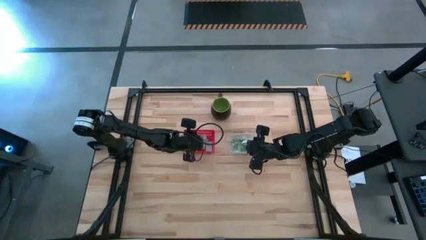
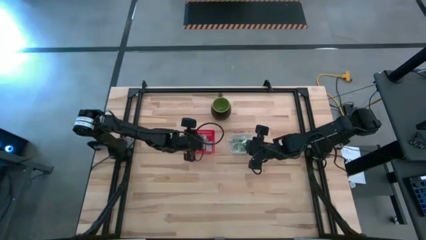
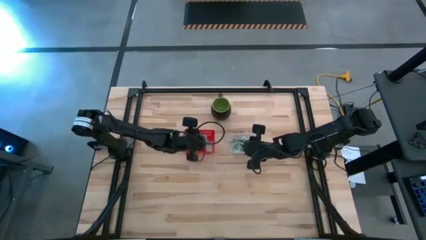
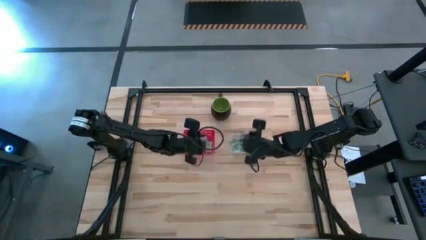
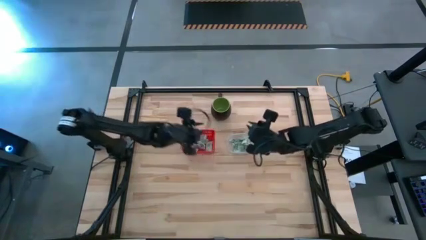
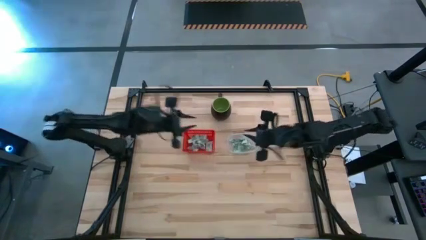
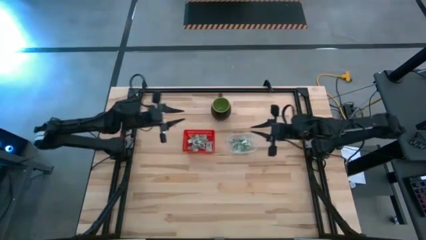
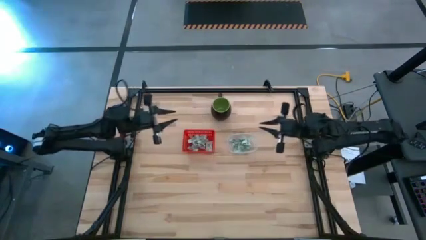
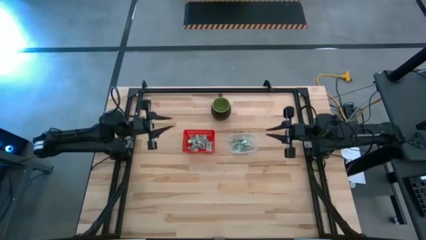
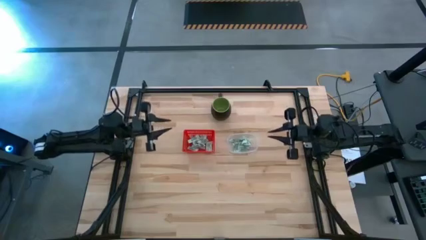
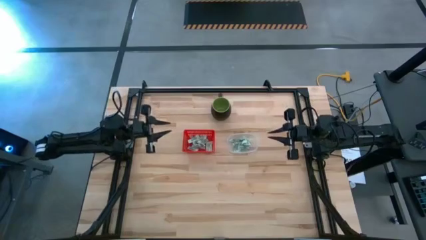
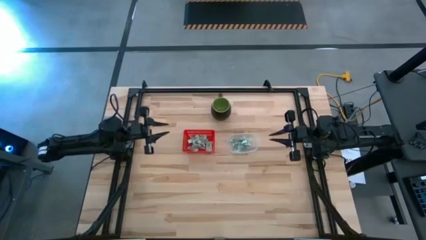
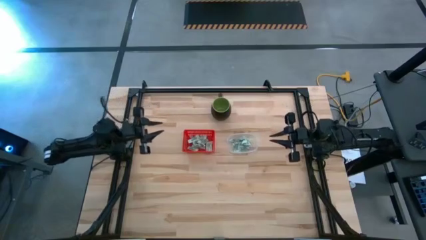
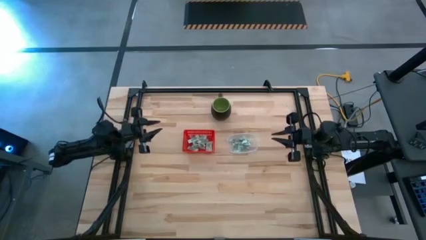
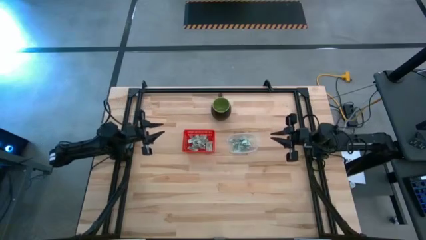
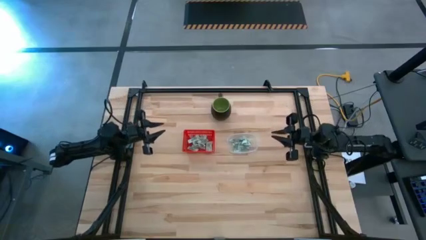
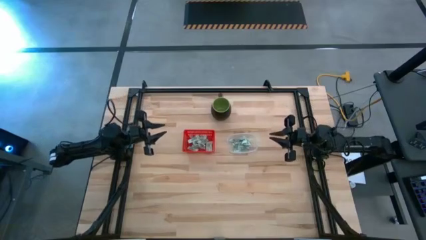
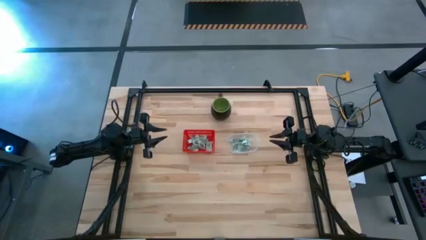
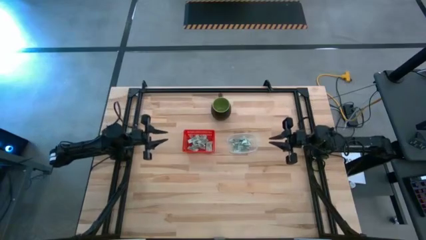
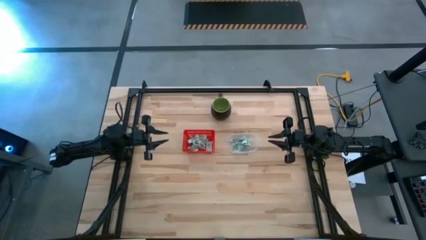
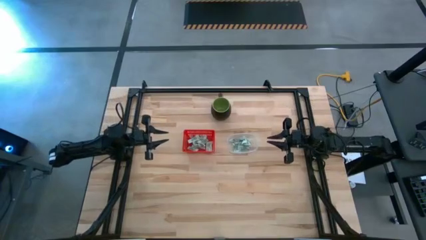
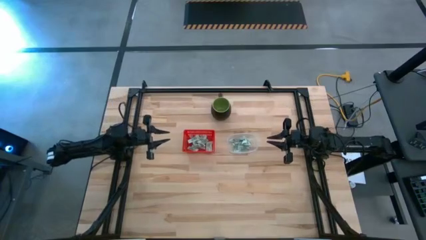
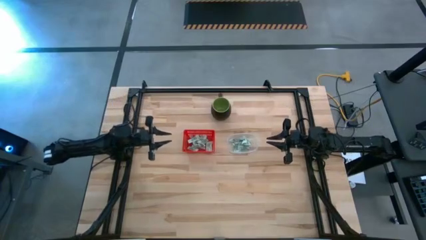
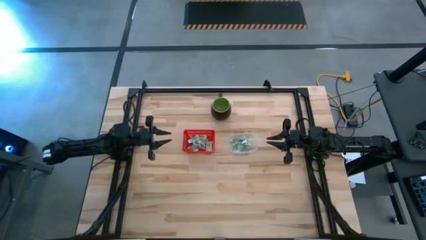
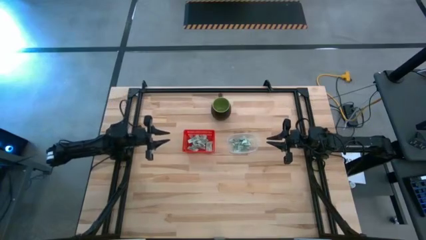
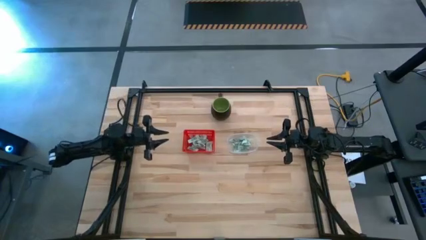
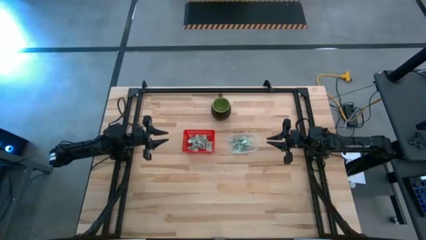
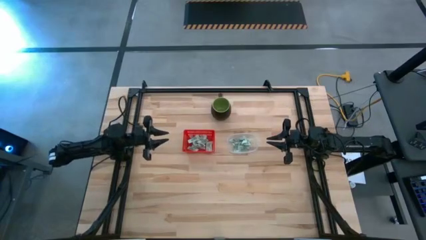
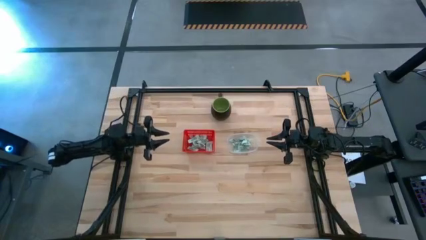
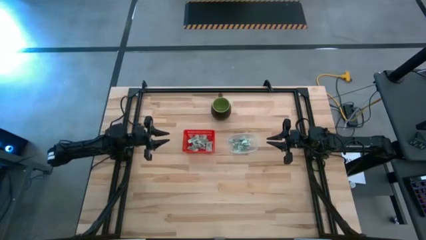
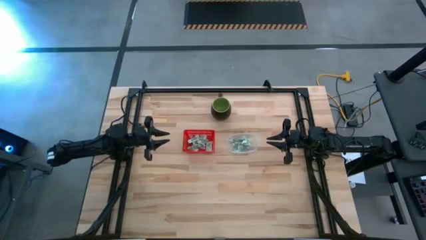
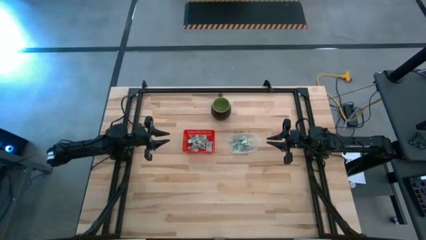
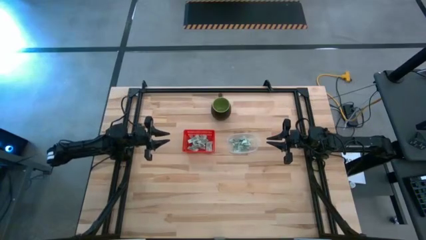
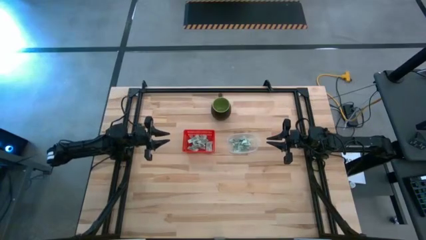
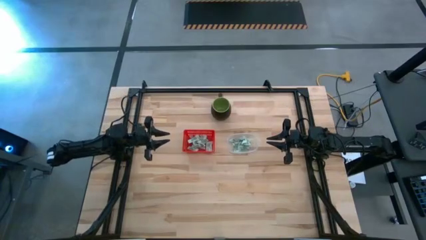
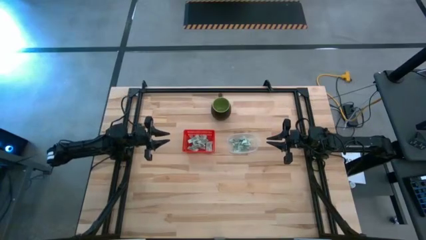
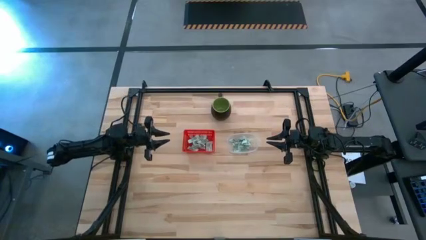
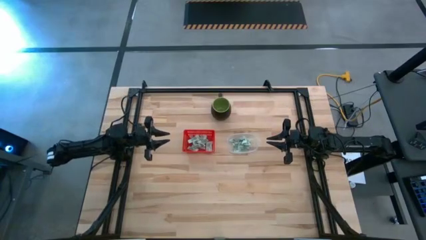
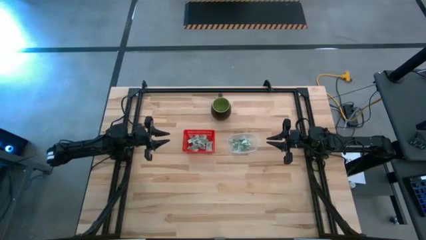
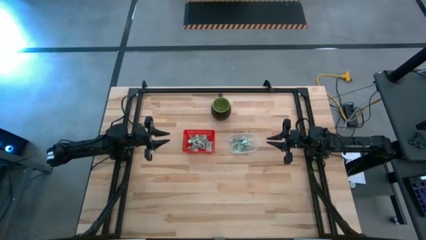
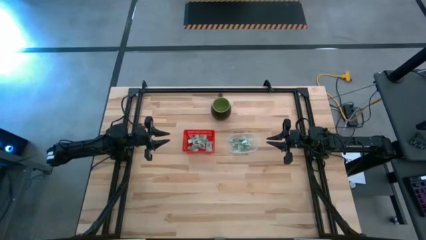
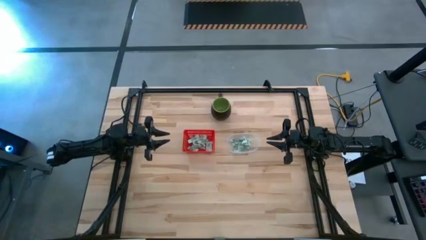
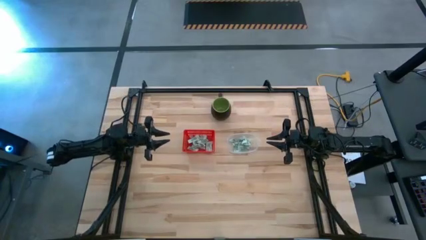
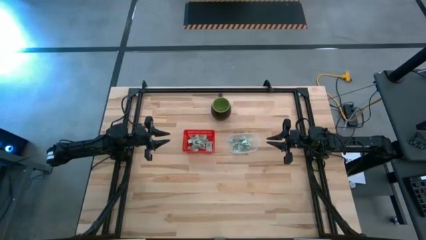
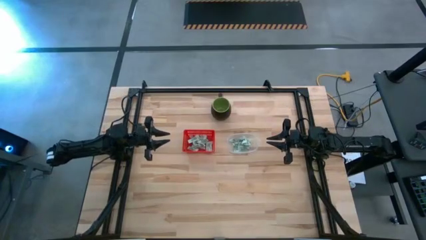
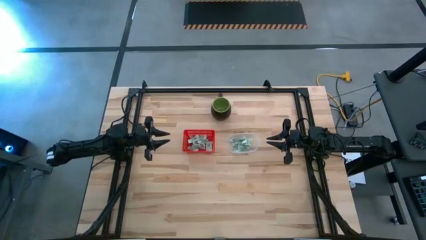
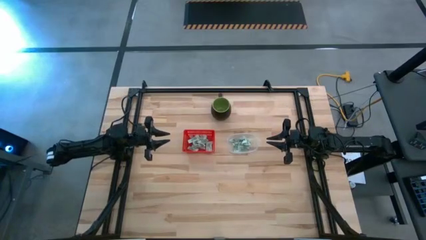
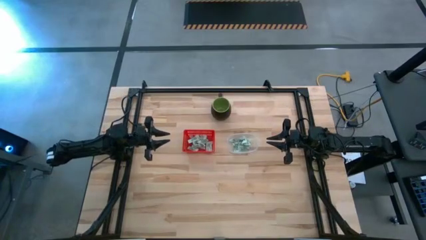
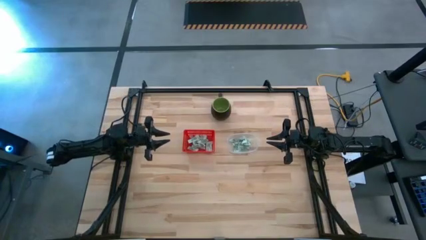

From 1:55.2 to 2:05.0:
Task: Pick and place items into bin
Return to Home Position

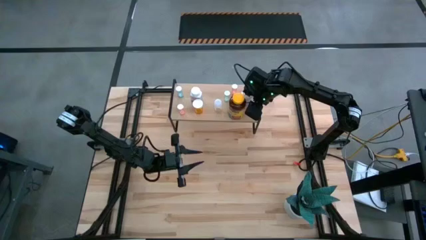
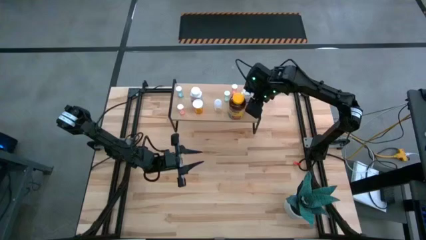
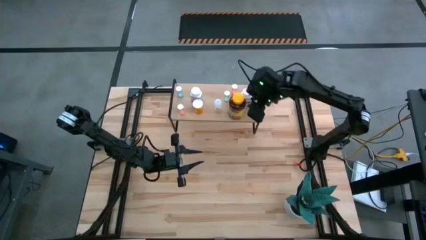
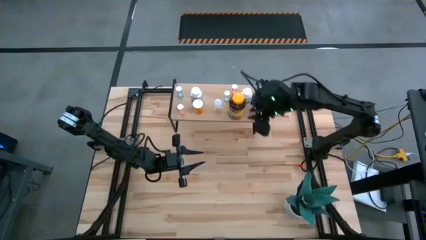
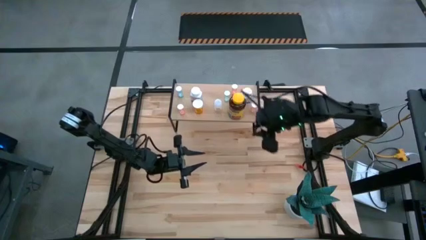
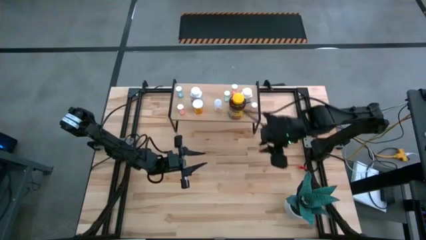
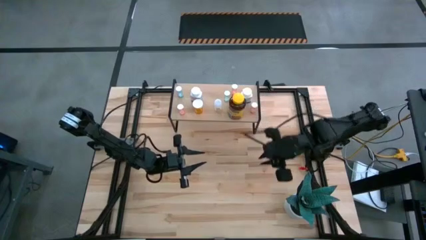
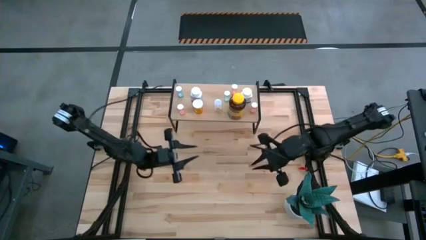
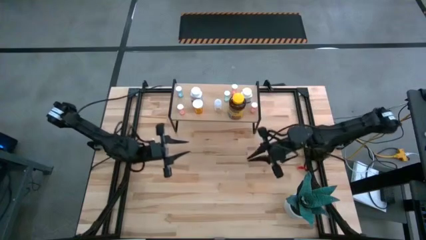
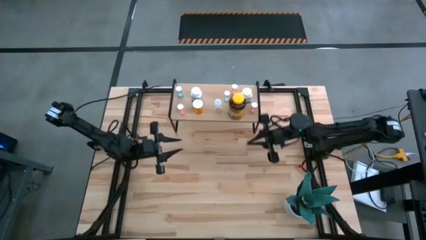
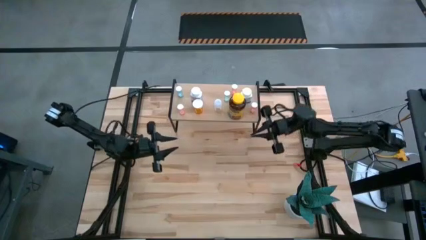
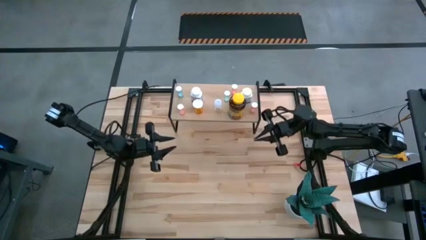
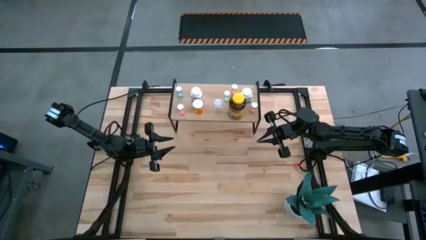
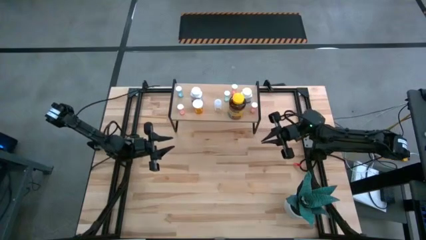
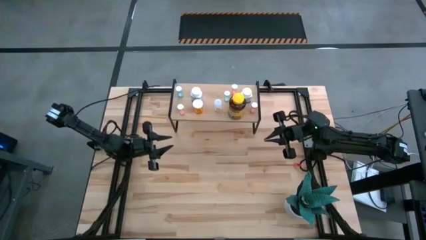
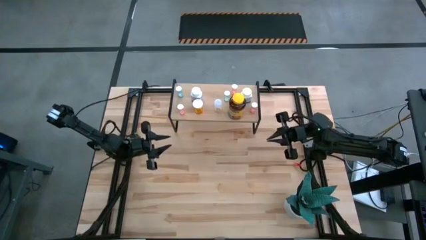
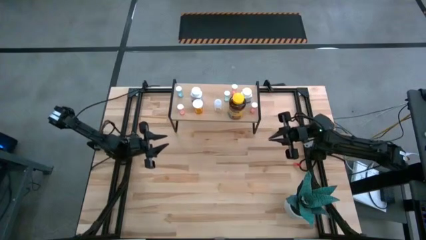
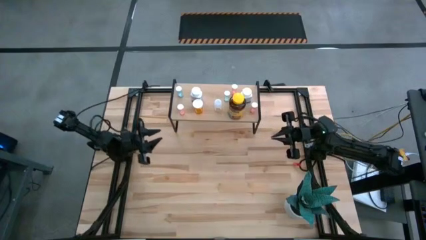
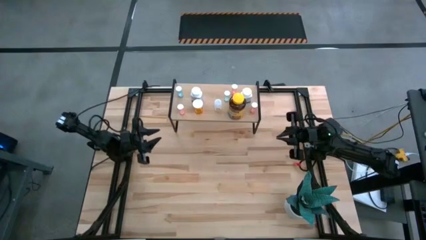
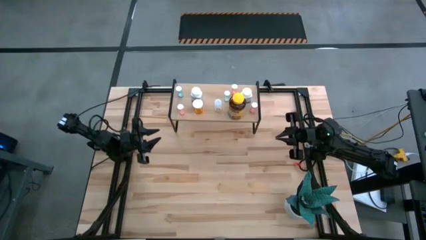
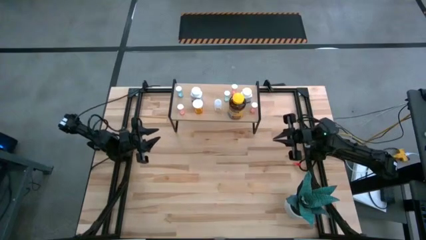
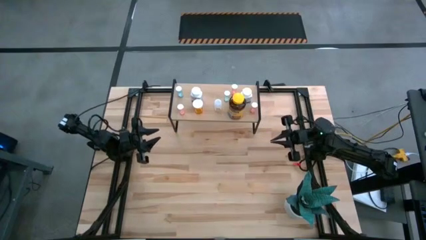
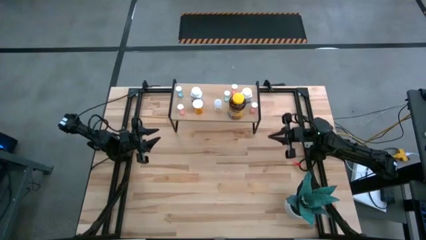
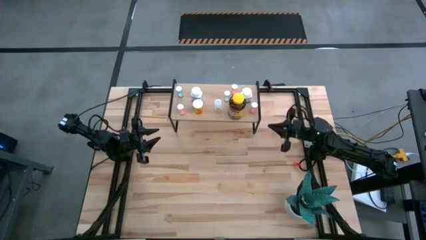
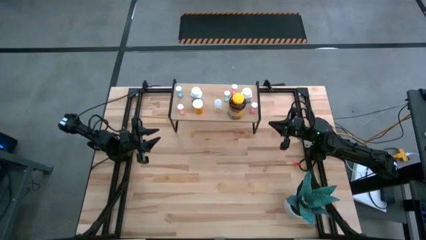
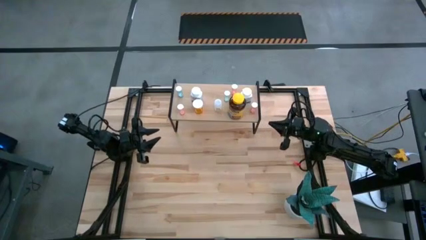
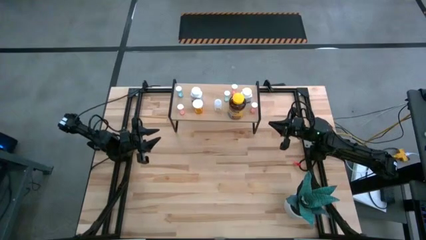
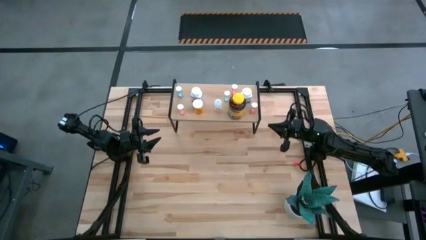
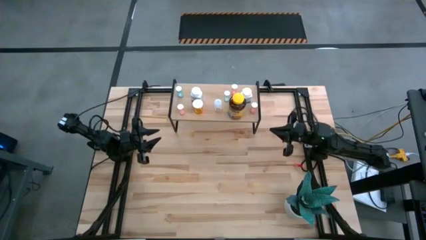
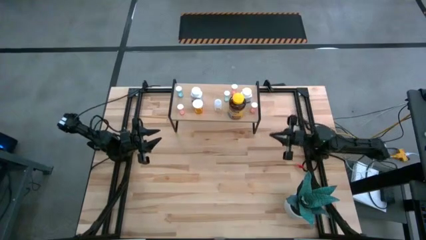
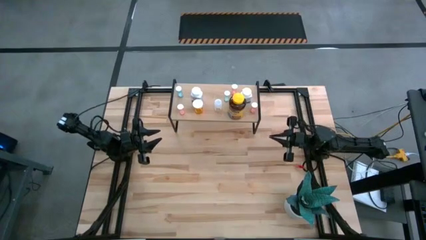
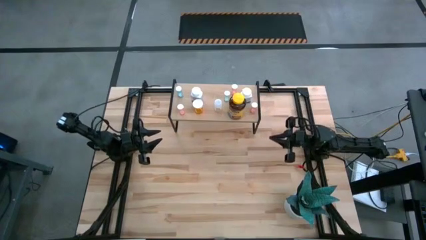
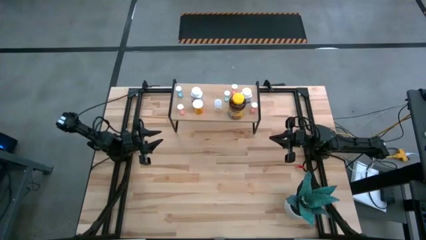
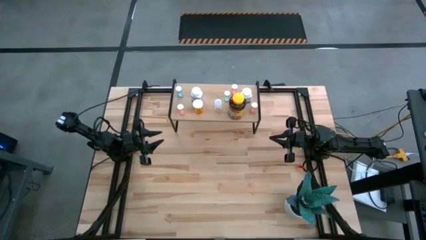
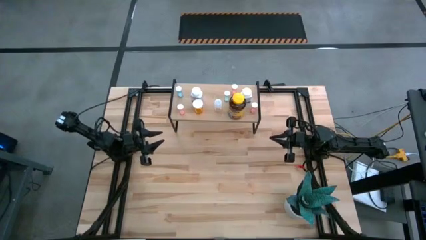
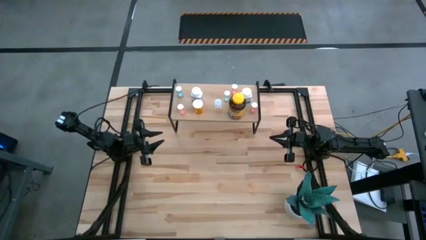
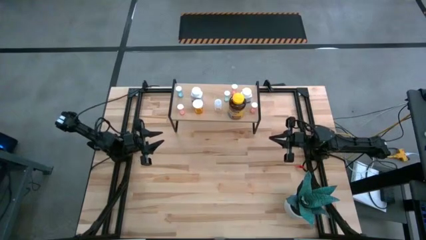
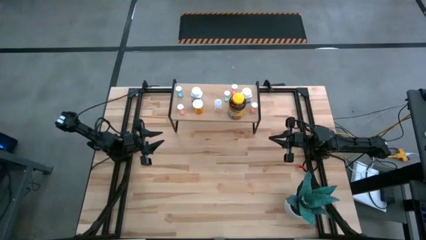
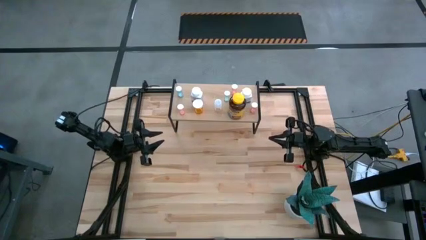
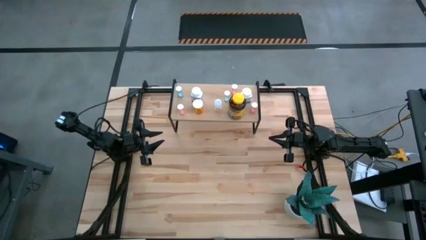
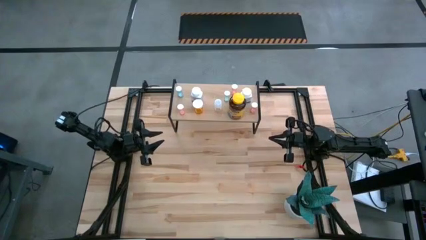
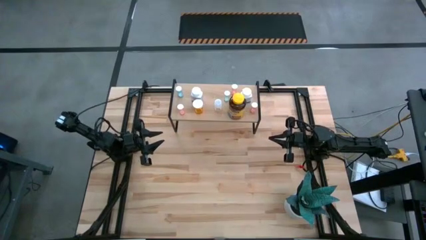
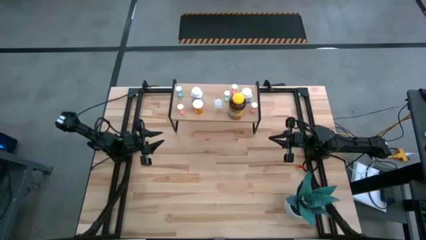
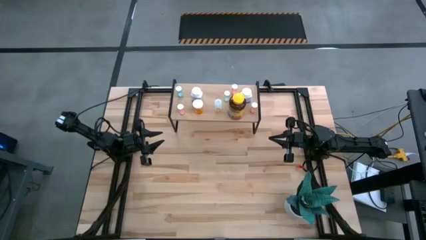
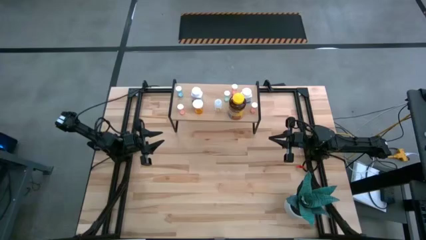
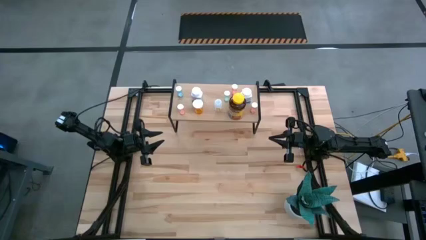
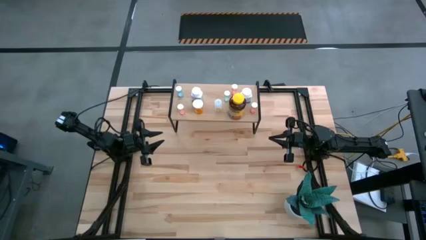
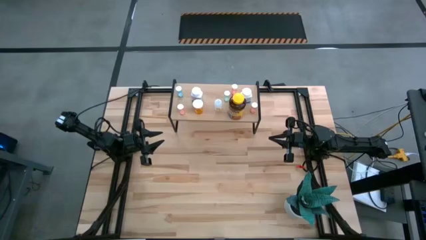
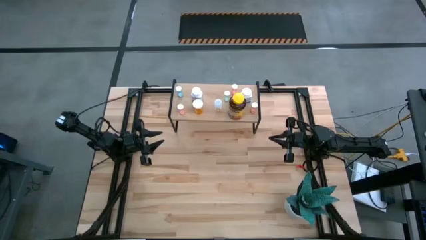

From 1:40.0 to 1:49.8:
Task: Pick and place medicine bottles onto shelf by color
Return to Home Position
